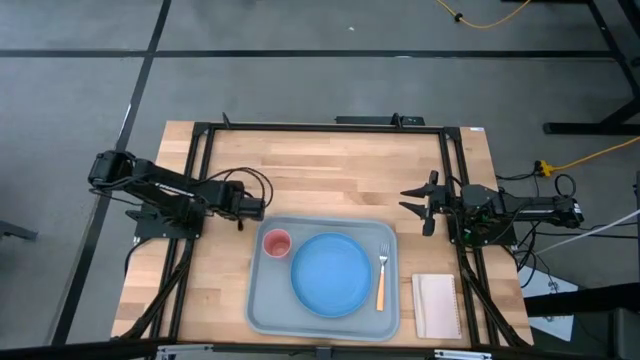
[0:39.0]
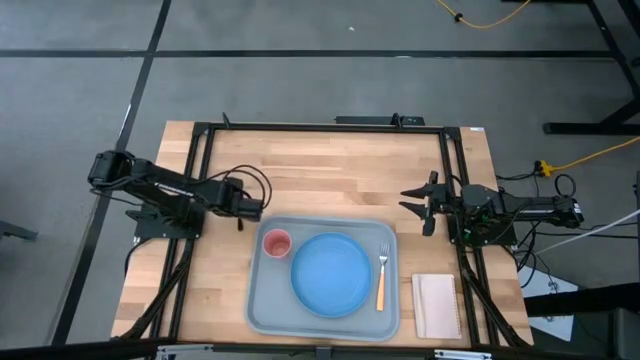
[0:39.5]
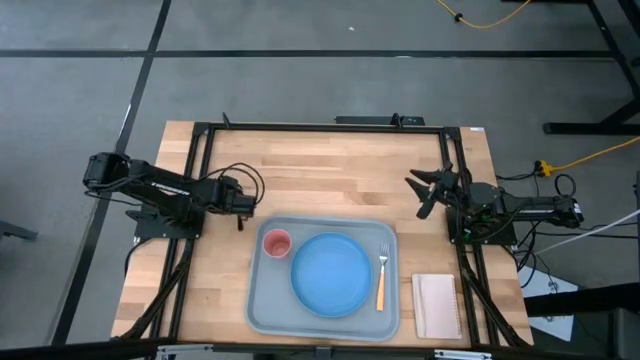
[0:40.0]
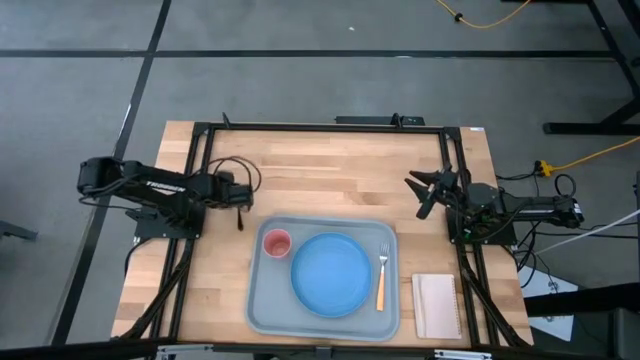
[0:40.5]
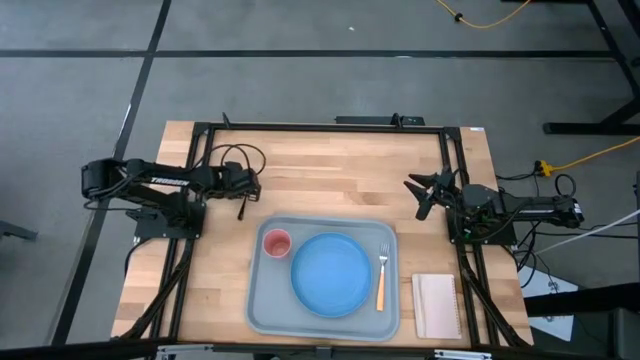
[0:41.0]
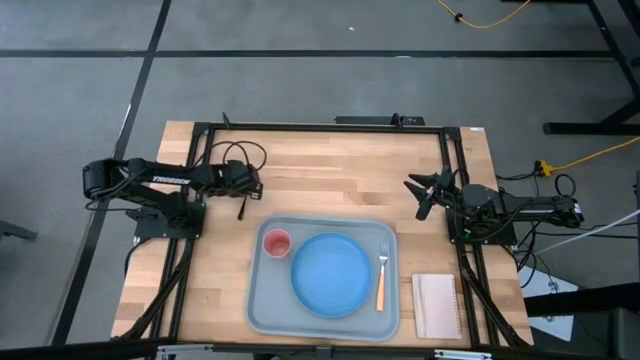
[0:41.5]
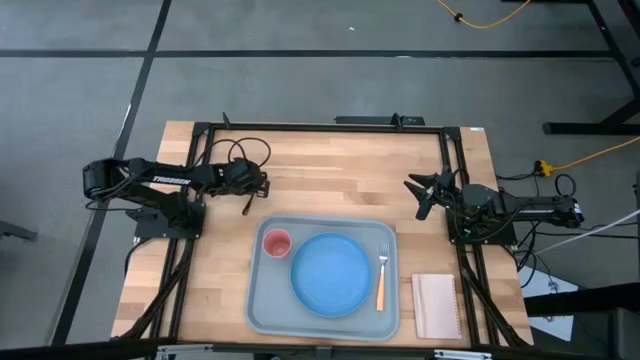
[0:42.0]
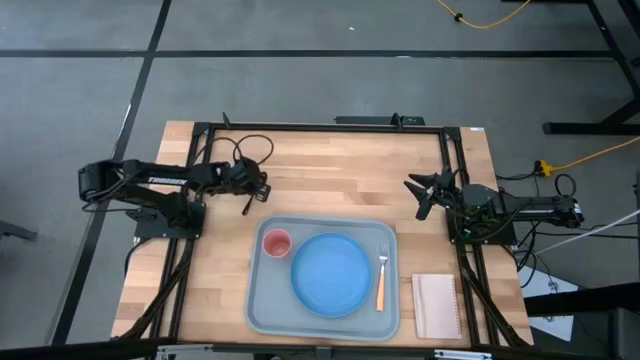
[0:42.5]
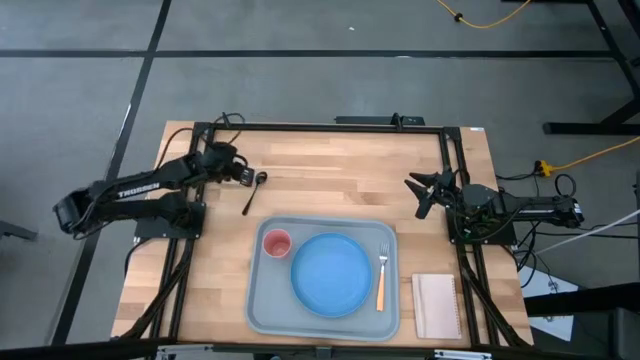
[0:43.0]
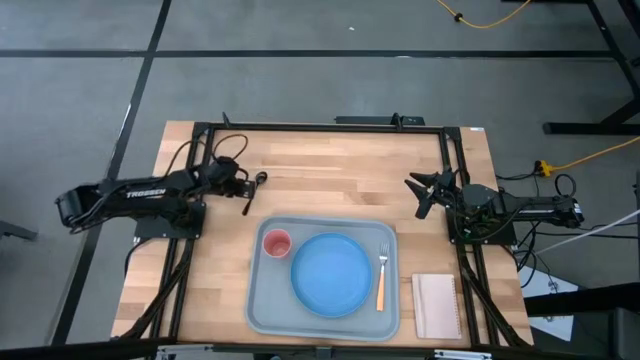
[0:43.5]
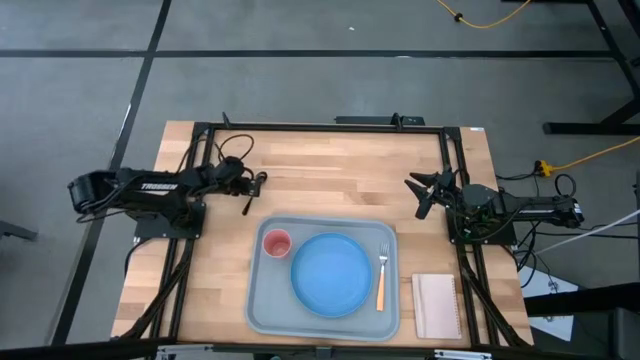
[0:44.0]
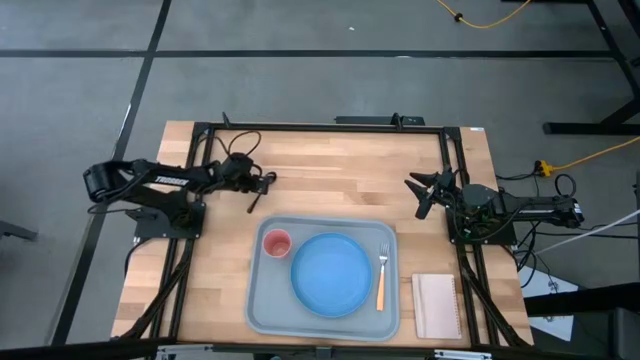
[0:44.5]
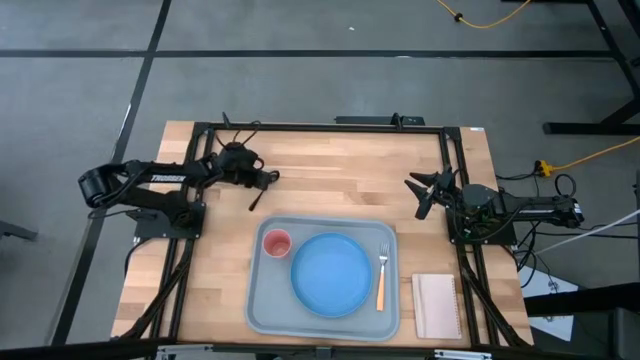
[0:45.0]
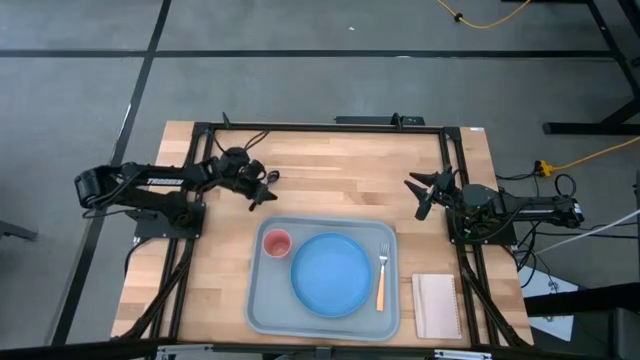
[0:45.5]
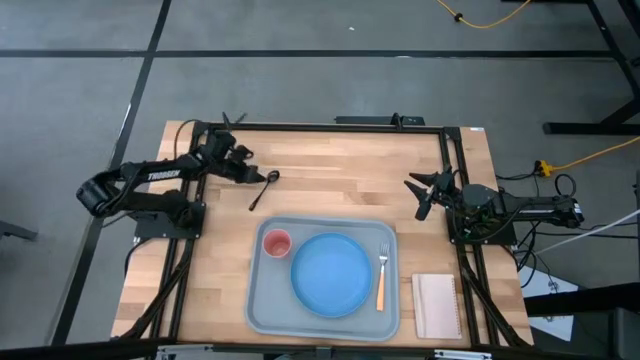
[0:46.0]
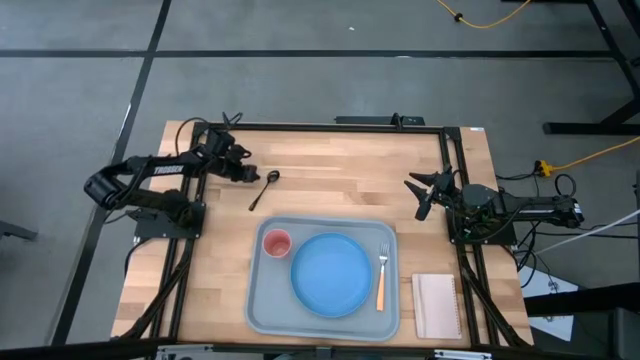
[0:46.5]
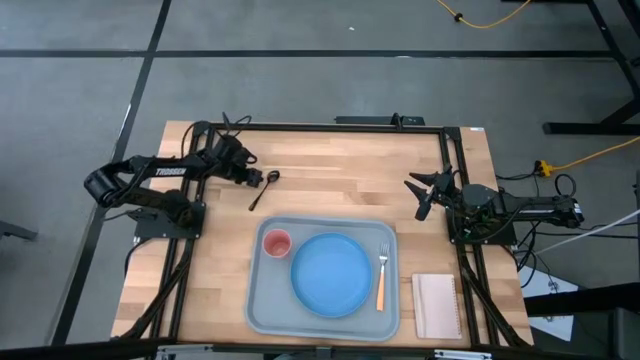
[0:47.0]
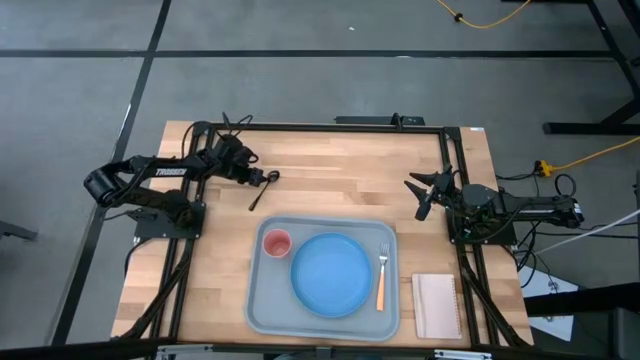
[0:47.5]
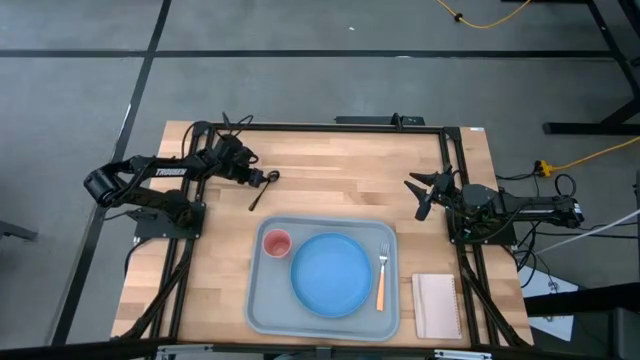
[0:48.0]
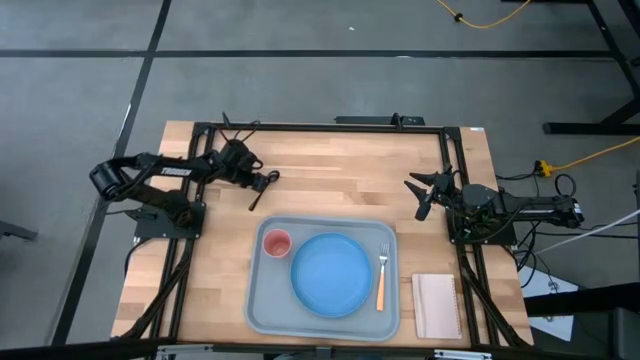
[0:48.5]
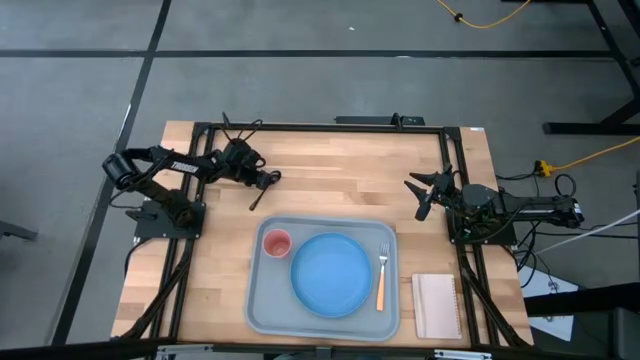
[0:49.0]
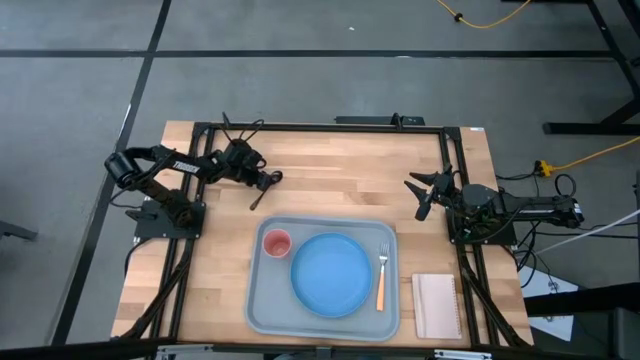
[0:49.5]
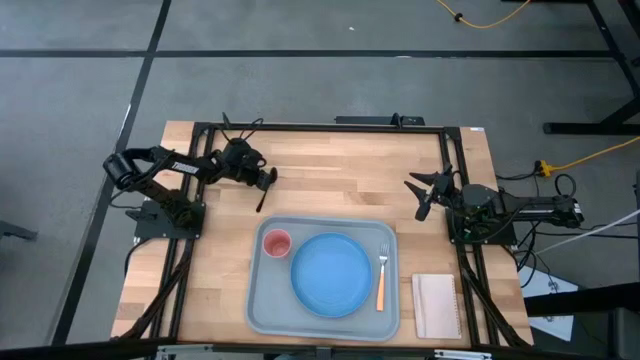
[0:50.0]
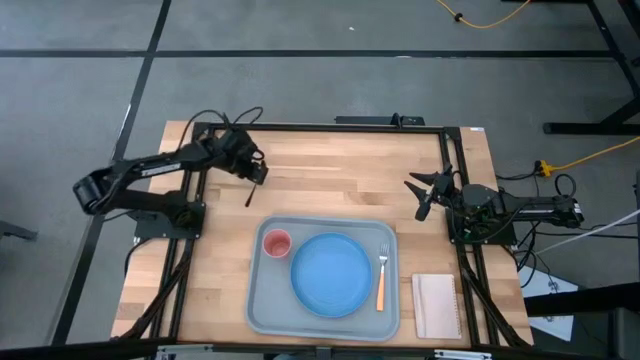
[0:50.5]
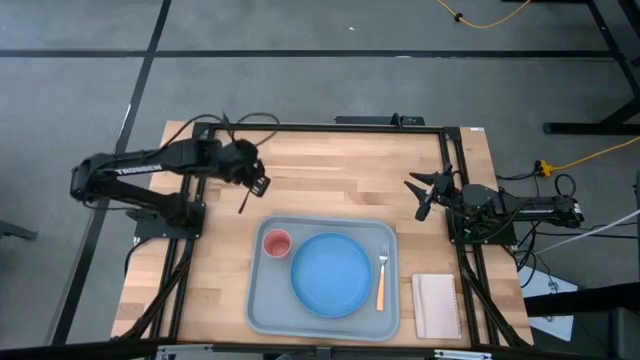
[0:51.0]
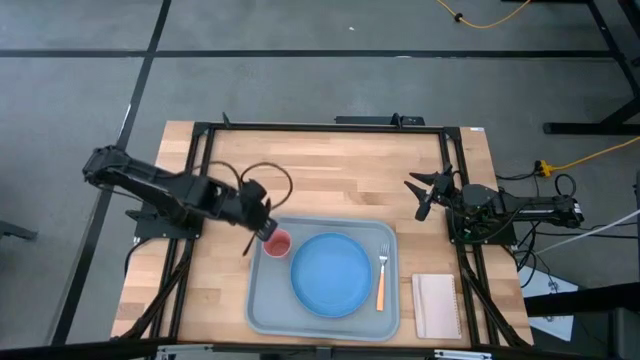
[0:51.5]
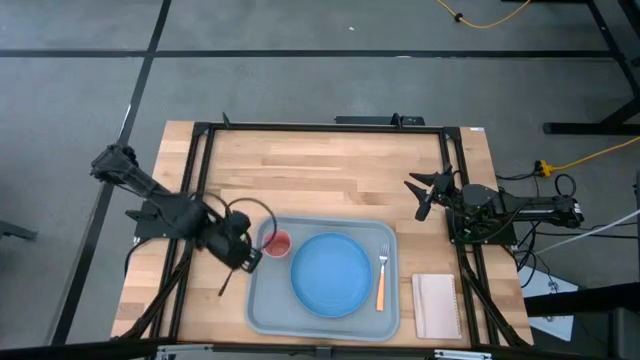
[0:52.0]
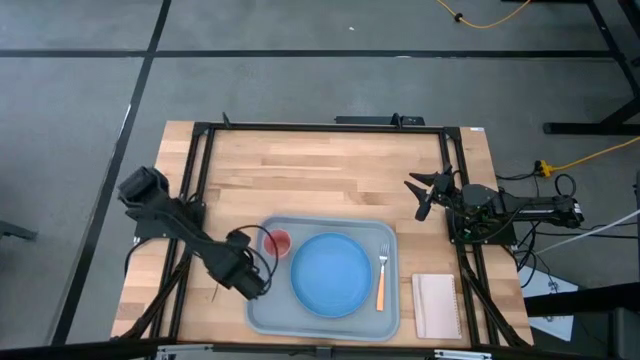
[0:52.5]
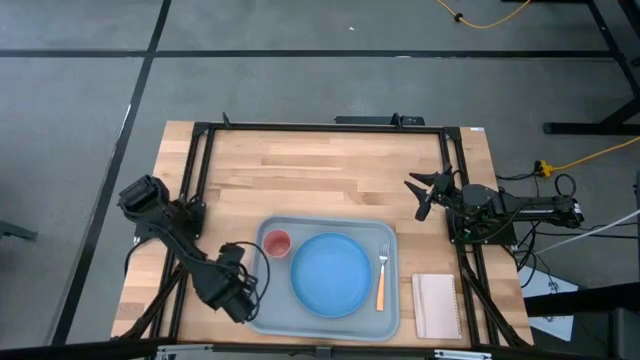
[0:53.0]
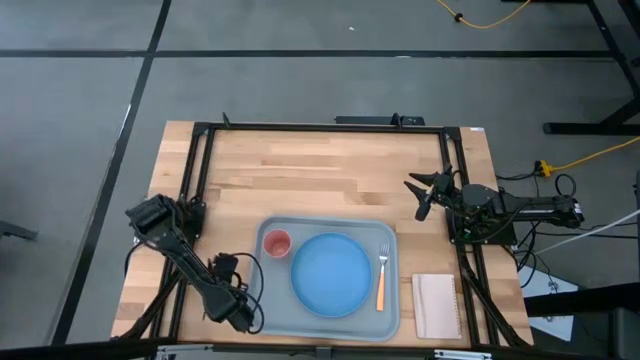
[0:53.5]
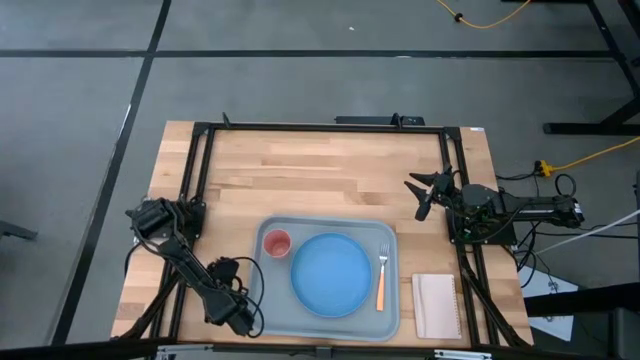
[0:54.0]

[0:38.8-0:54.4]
Task: Pick and place plate/cup/fork/spoon on tray
Put the black spoon on the gray tray on the left of the blue plate

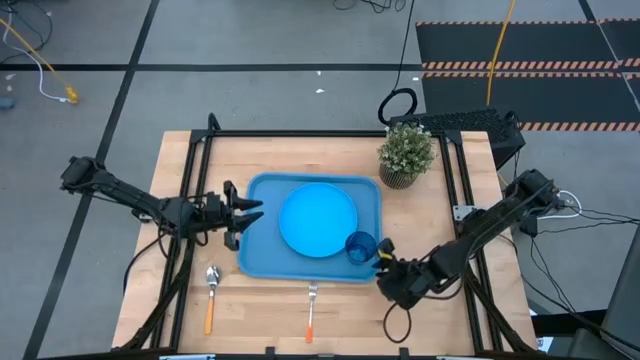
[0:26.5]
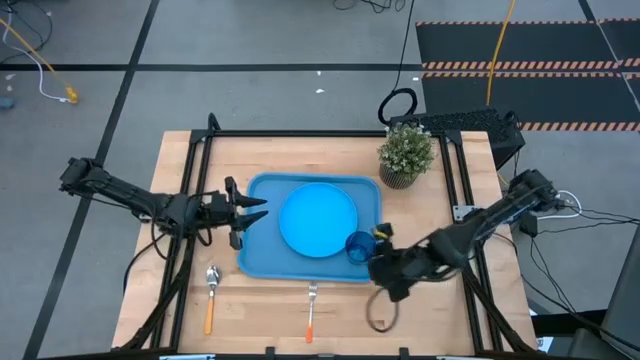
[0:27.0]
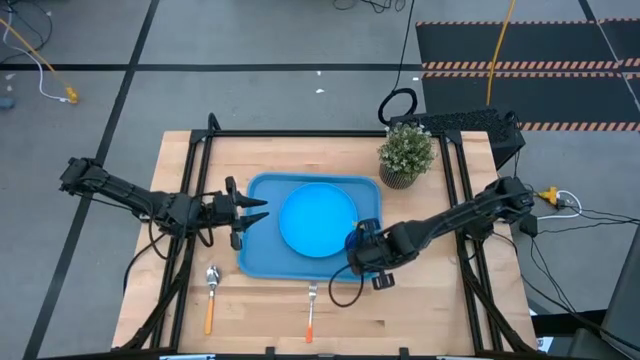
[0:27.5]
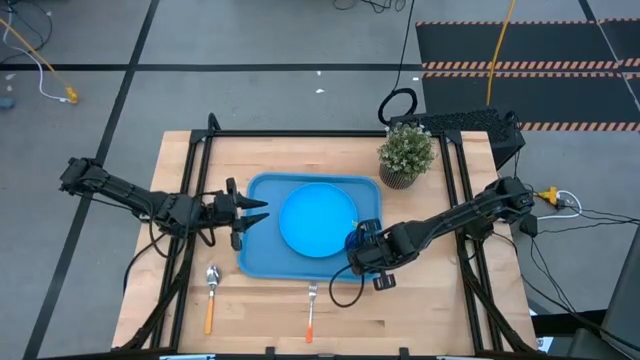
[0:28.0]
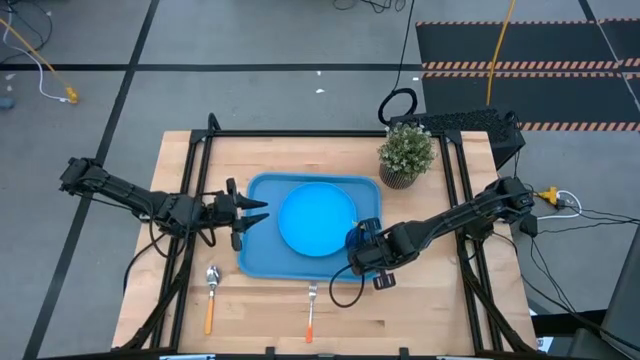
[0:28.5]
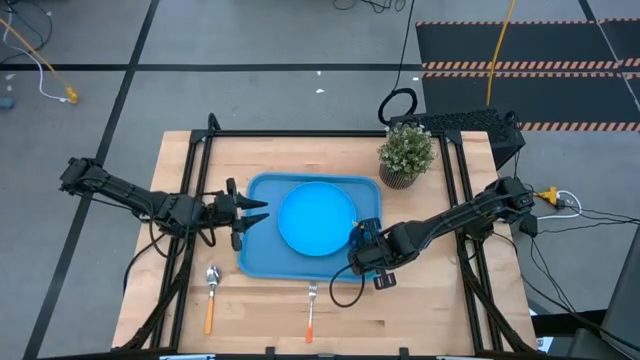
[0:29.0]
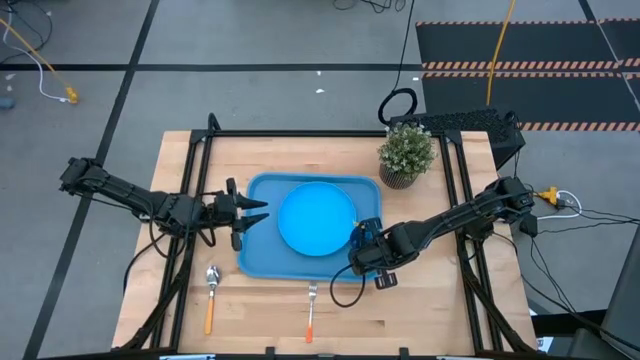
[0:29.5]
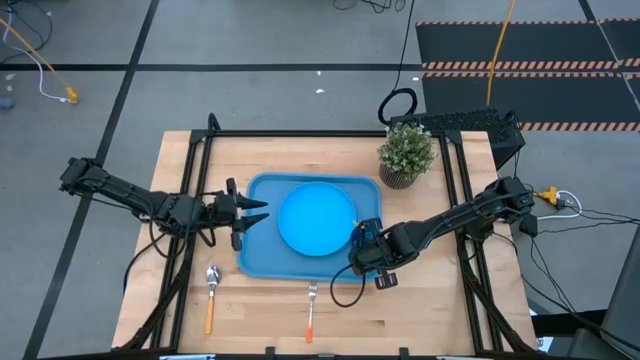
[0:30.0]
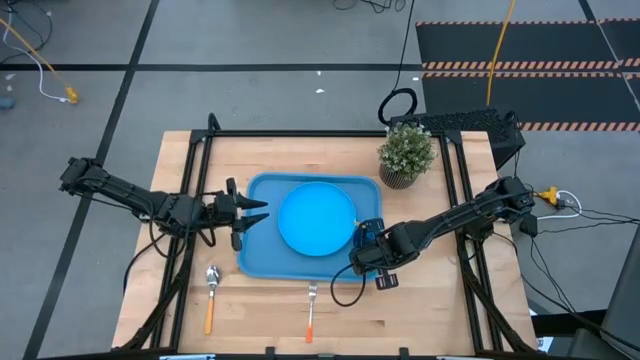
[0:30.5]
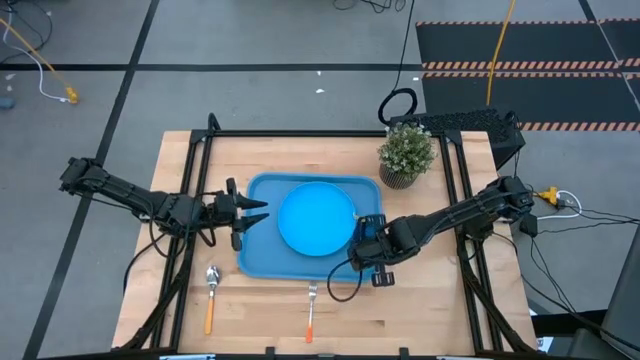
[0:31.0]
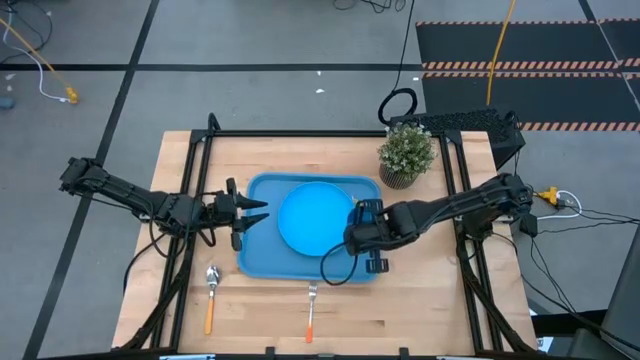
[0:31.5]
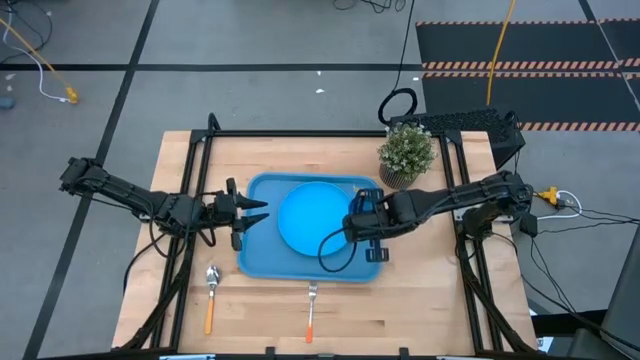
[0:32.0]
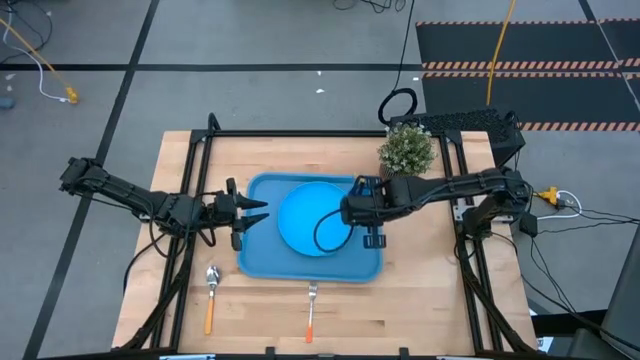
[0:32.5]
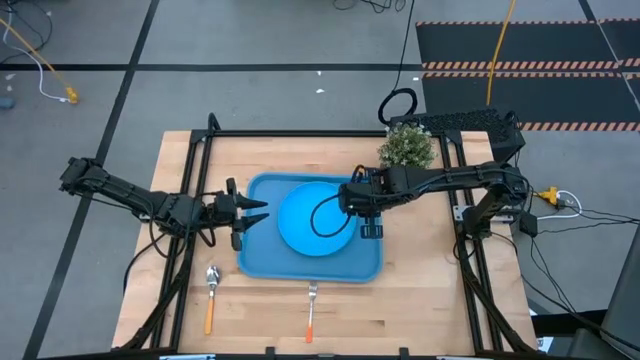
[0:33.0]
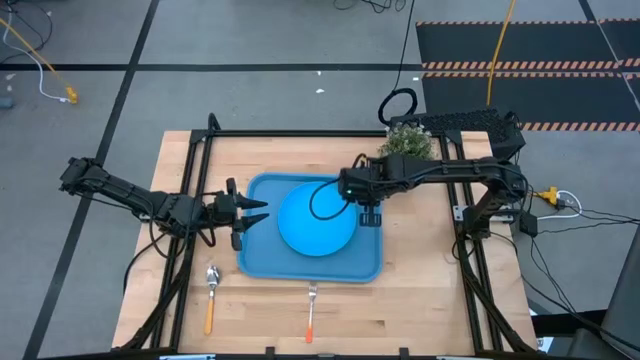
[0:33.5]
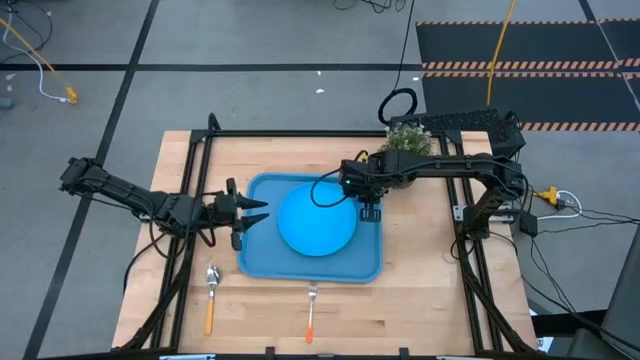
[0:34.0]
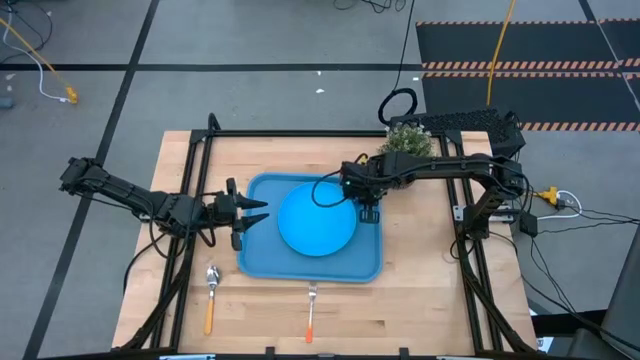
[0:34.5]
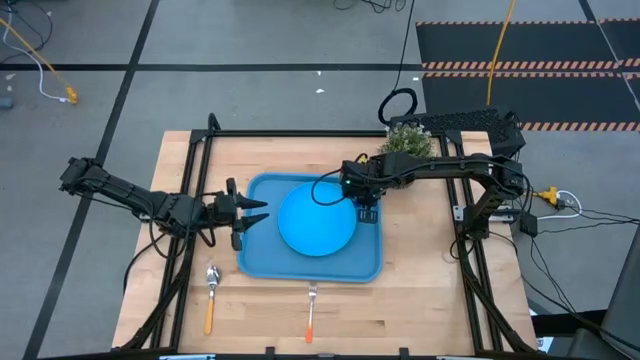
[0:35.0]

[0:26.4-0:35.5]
Task: Pick and place plate/cup/fork/spoon on tray
Move the blue cup on the blue tray to the top right of the blue plate
